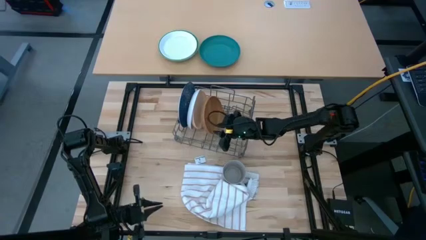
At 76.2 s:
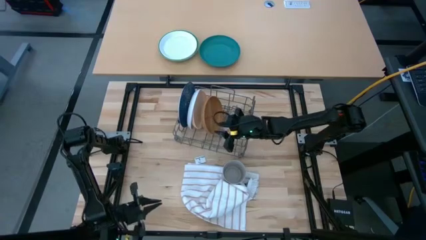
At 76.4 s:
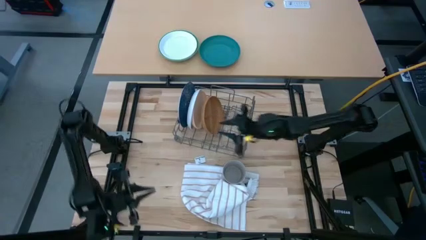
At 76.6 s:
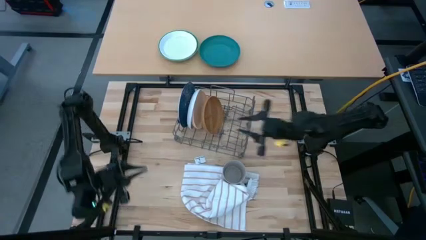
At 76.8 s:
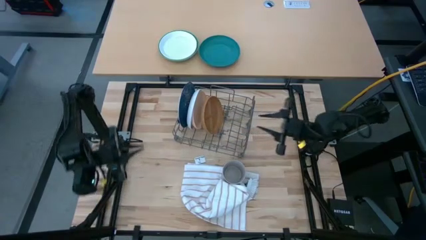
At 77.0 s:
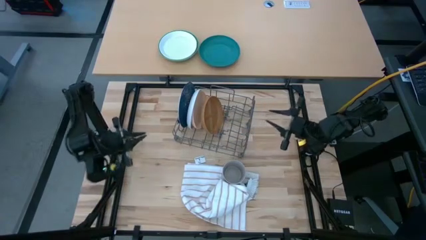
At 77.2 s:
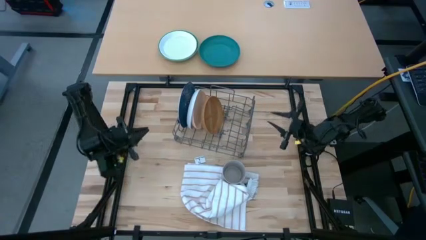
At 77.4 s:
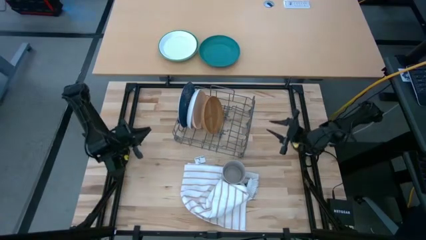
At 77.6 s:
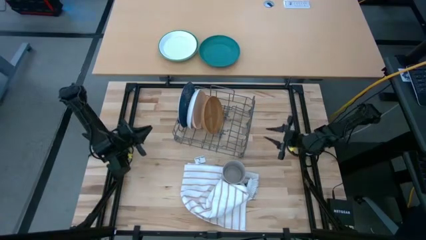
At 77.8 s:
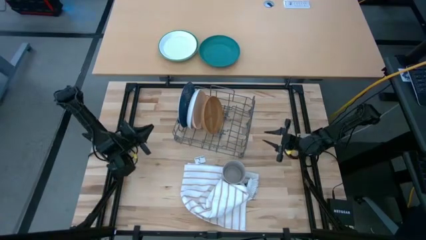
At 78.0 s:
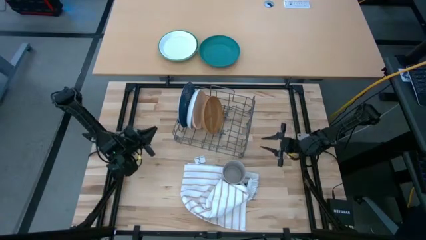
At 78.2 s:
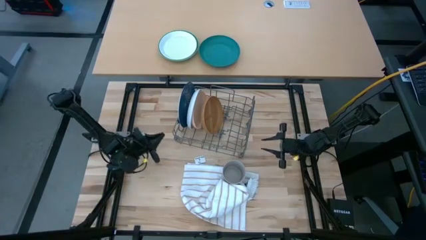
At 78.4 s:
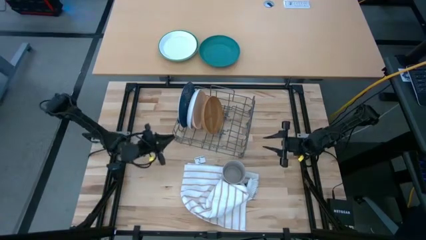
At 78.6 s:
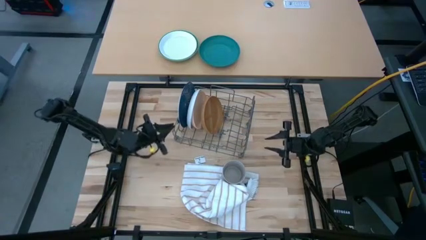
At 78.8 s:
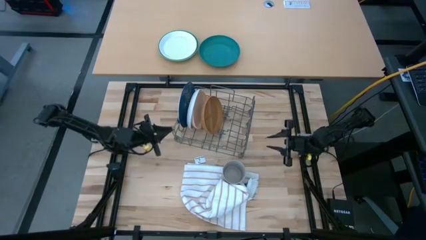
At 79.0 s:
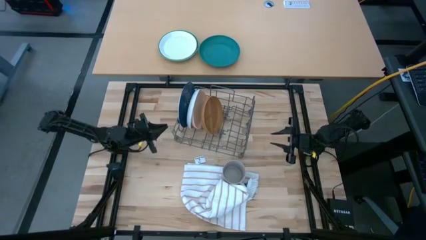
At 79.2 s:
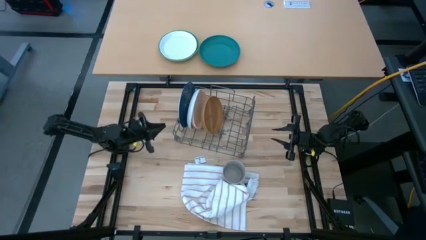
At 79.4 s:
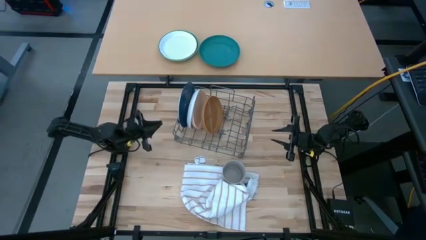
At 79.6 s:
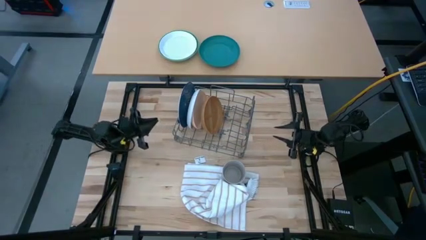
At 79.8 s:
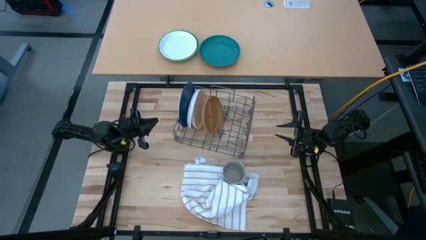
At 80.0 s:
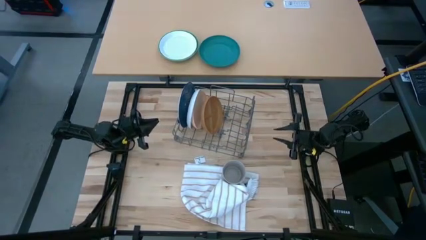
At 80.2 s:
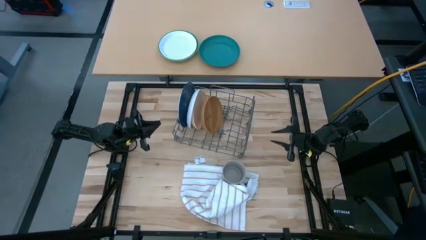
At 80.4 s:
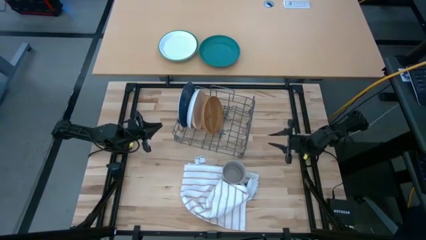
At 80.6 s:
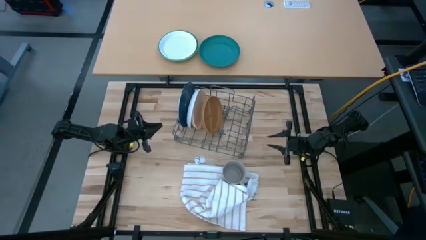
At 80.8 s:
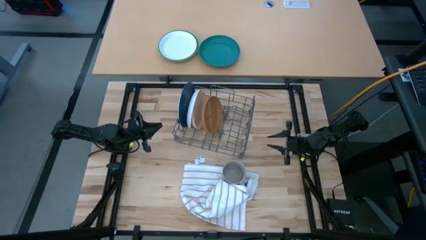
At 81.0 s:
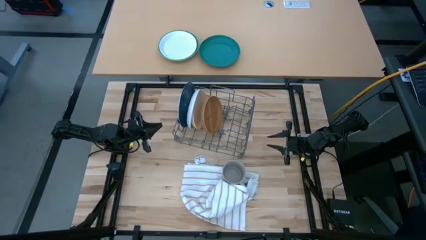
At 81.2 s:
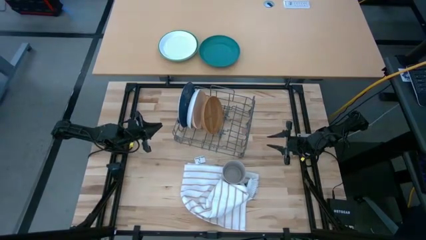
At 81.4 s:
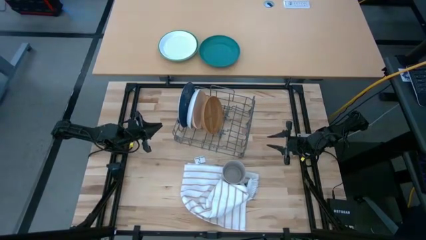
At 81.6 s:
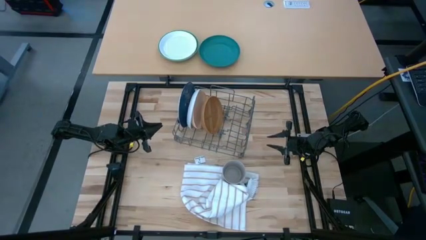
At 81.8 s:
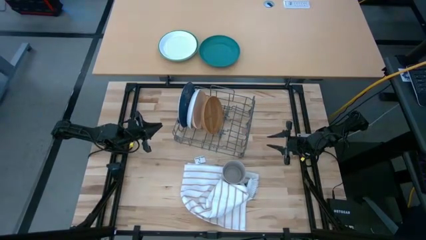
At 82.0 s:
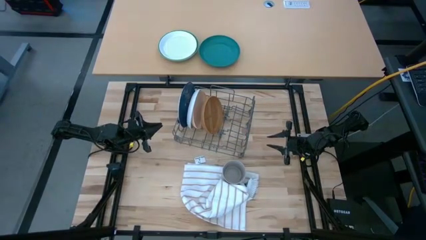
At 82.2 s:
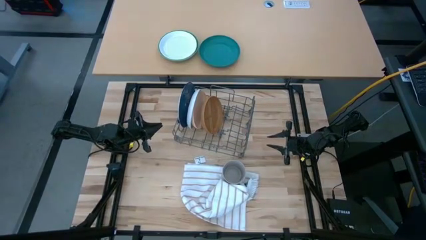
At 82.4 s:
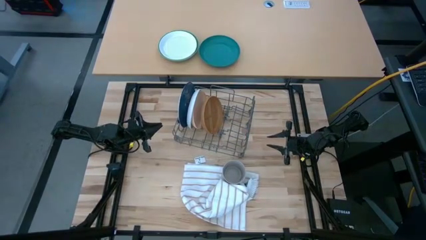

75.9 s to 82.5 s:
Task: Sort dishes
Return to Home Position

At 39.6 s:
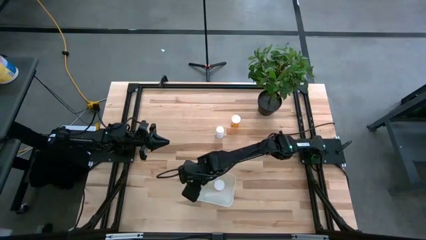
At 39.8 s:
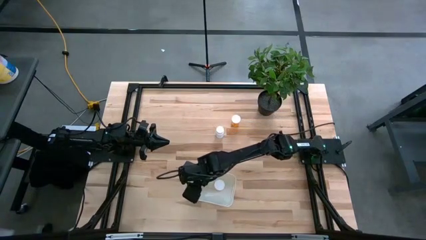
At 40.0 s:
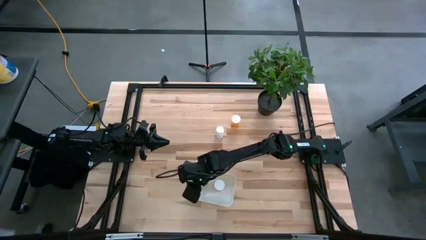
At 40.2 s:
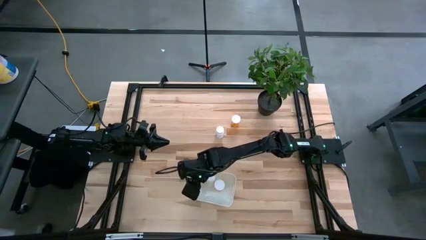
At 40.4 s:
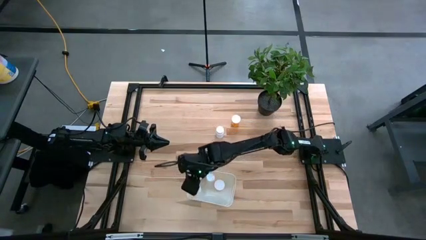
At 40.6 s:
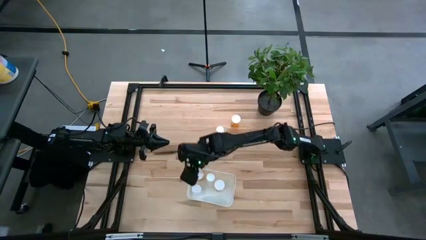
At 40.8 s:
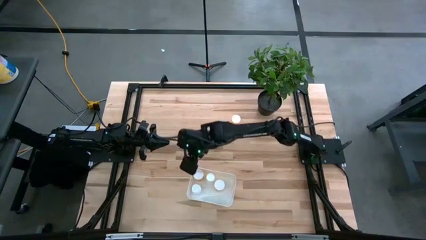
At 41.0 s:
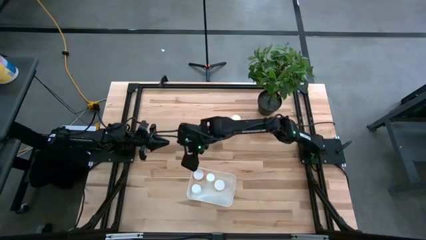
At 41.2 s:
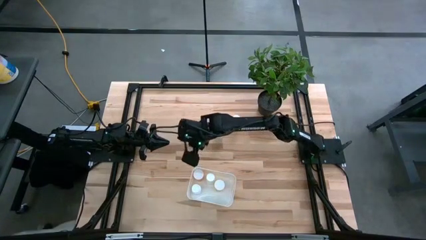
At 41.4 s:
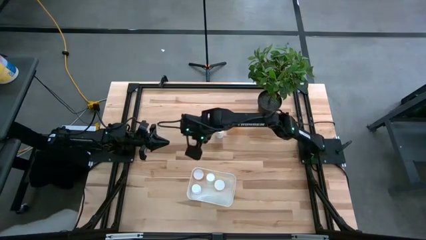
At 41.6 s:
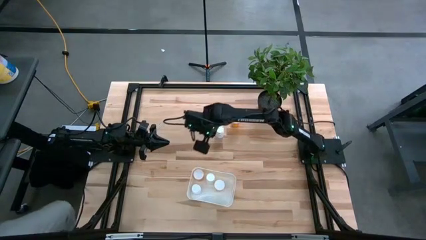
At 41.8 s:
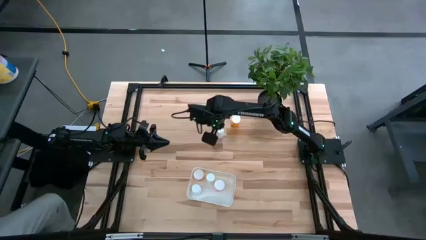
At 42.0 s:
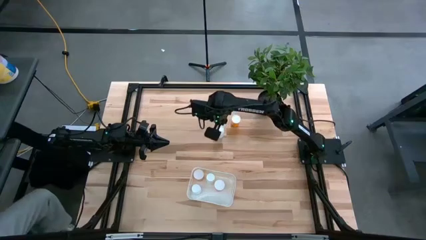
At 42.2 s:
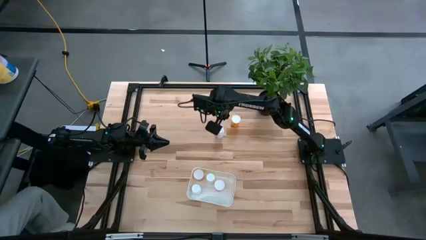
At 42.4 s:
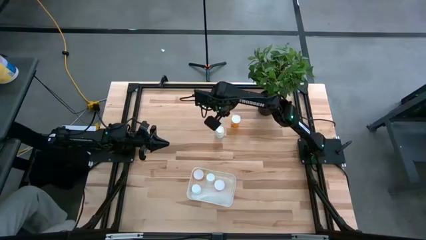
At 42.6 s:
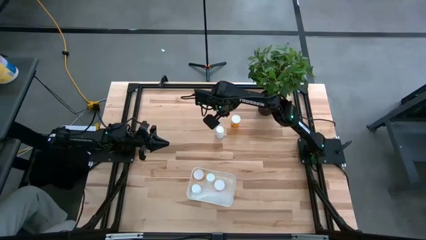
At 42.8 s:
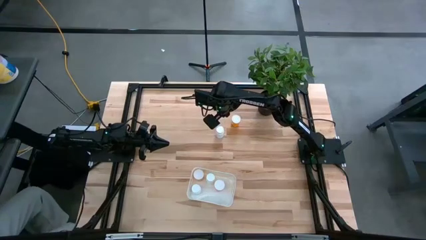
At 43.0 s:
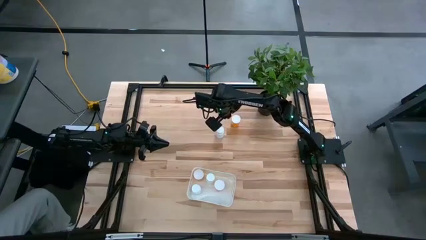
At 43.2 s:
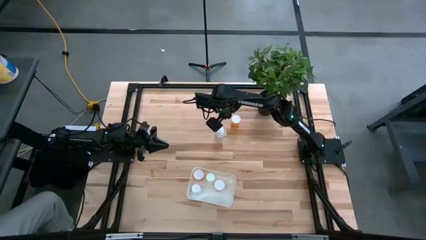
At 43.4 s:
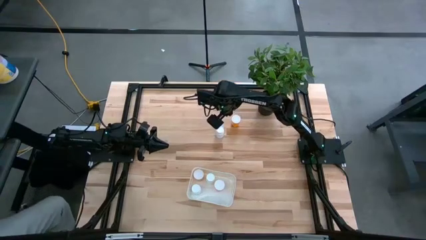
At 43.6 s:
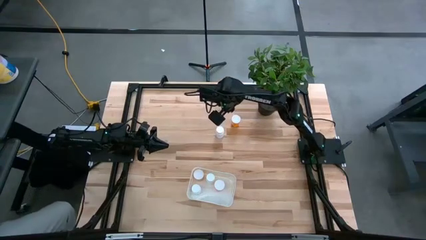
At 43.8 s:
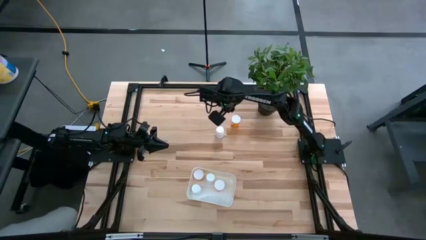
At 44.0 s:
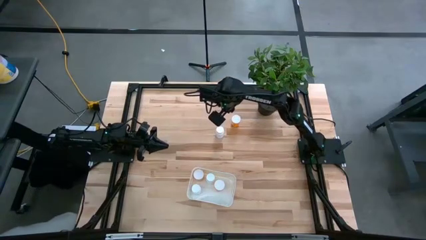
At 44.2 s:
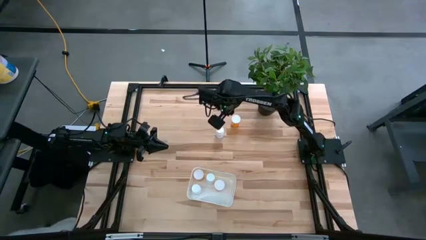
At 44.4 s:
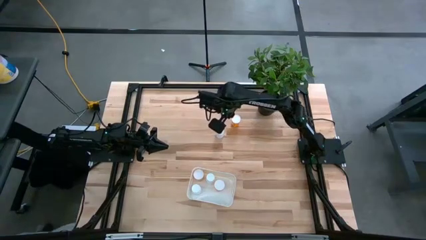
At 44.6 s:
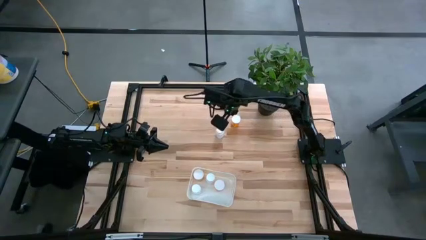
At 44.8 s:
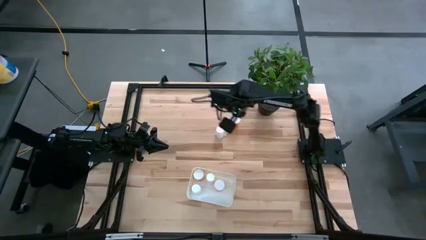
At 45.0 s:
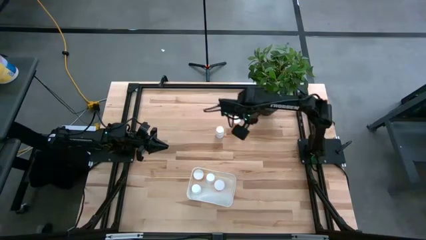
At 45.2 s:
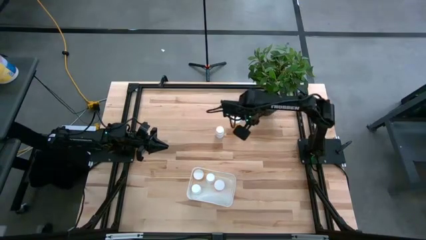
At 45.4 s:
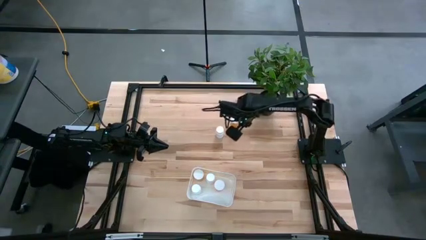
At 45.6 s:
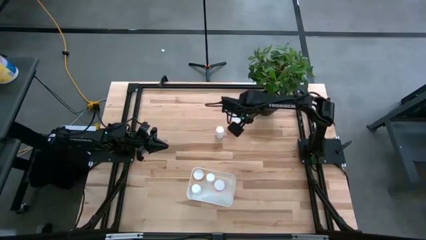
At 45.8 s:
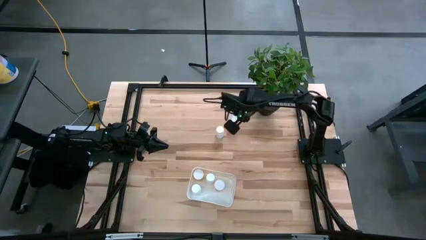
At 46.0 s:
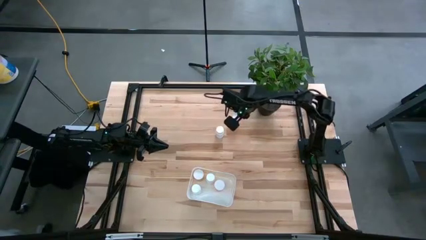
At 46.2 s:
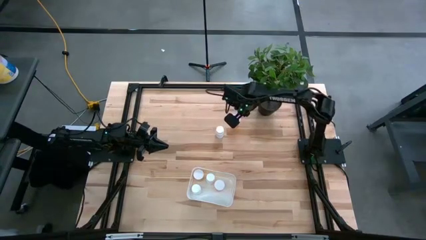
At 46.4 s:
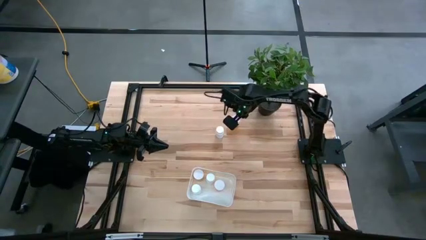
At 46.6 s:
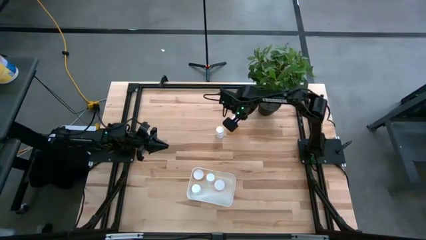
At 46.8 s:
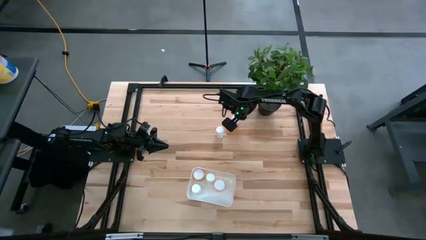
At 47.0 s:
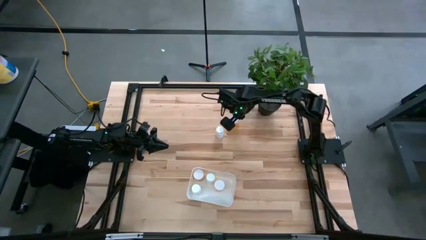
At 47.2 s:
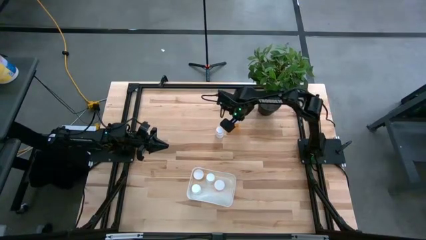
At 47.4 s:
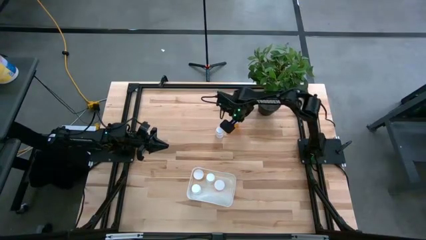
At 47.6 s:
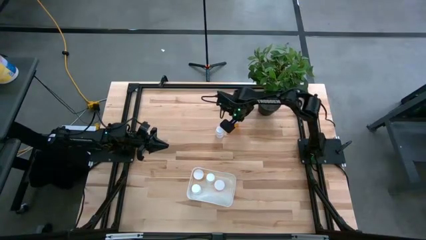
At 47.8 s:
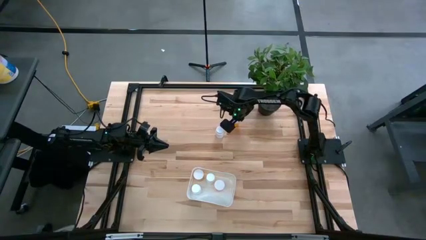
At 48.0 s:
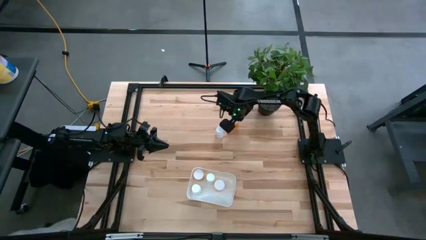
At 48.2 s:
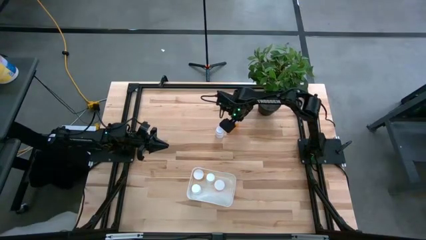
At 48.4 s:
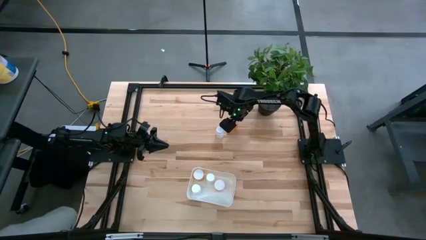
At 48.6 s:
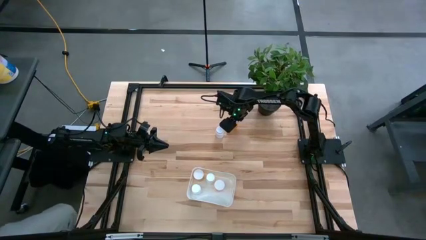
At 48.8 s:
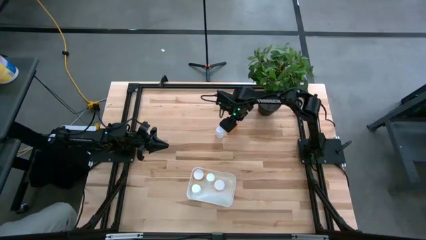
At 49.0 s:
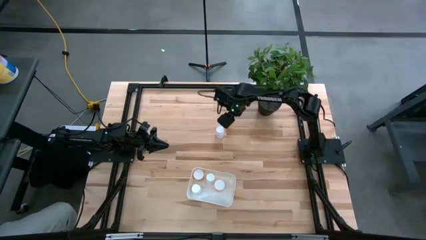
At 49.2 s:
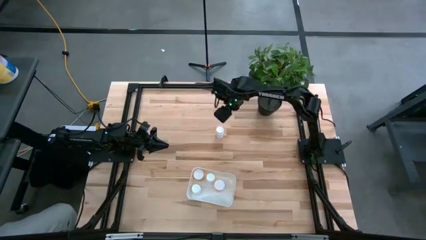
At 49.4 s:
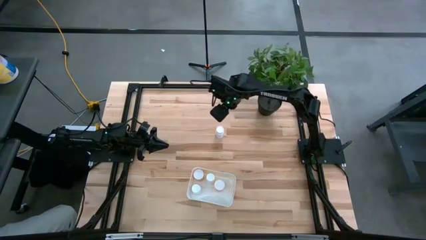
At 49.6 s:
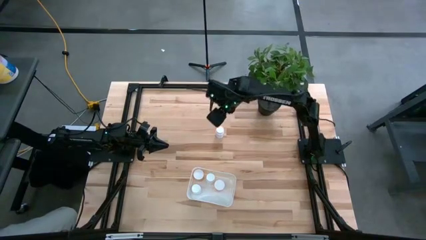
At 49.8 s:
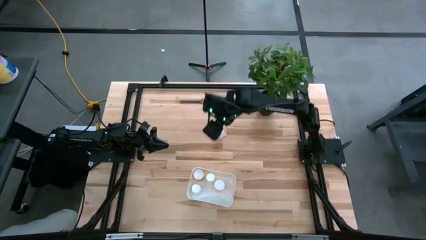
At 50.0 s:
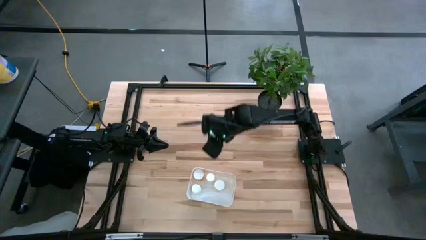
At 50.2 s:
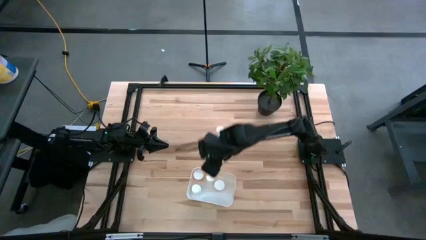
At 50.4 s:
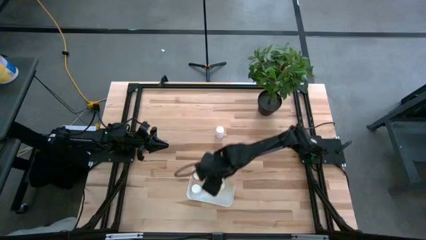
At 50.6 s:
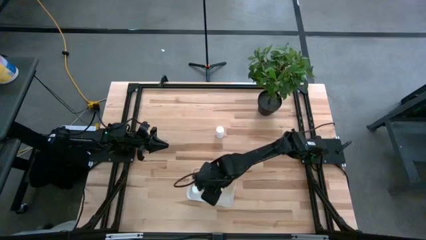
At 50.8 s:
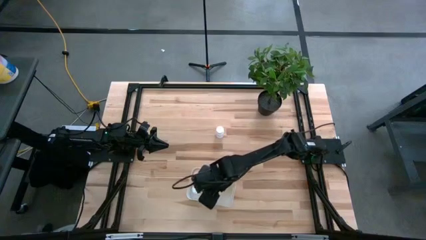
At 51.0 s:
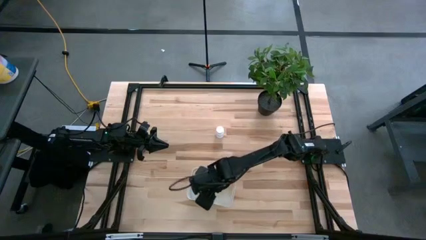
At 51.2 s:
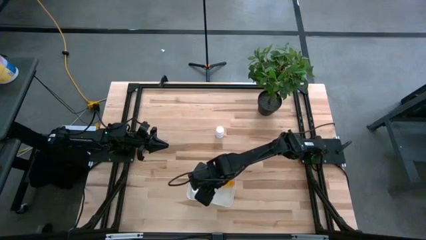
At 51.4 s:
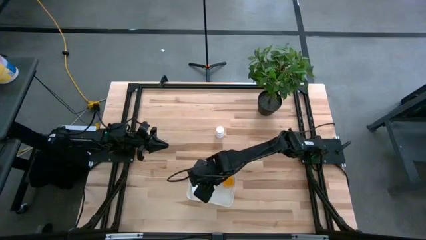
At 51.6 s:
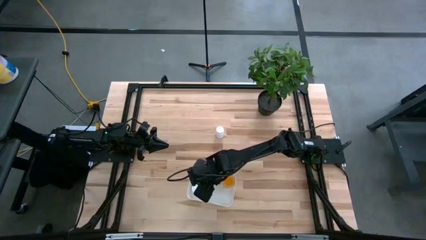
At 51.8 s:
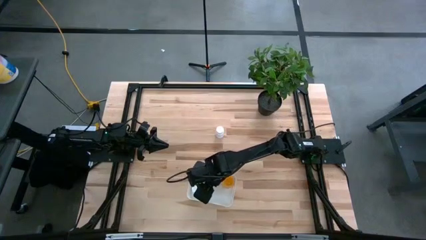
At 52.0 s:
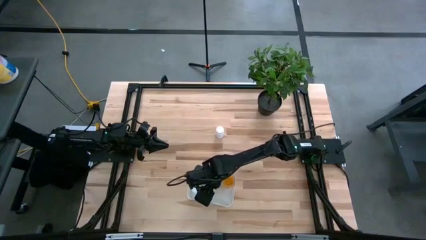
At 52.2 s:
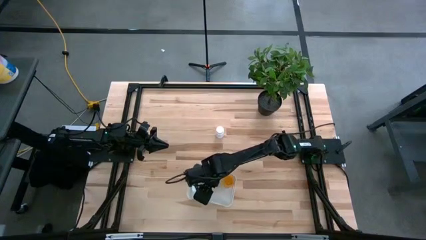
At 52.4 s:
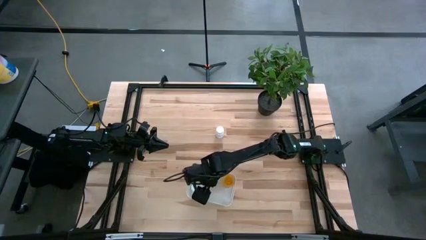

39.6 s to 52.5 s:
Task: Pick and place pill bottles into a basket
Put the orange medicine bottle into the container
